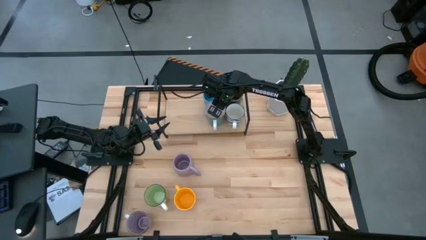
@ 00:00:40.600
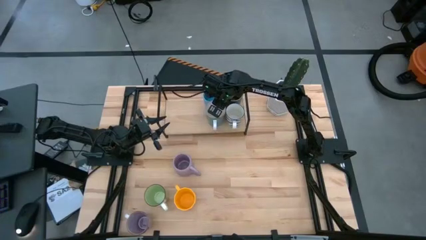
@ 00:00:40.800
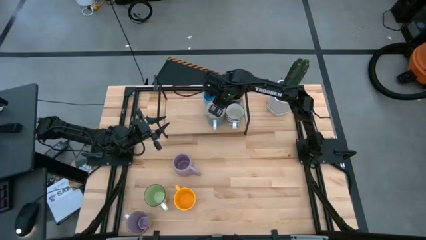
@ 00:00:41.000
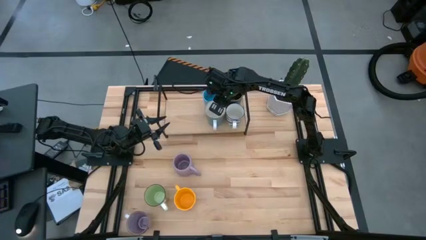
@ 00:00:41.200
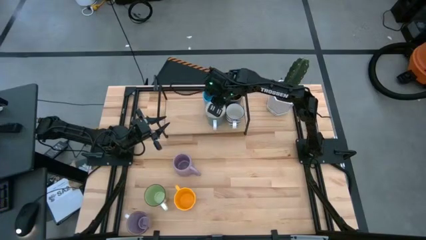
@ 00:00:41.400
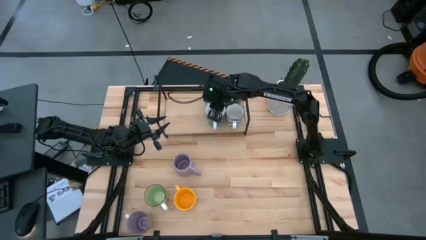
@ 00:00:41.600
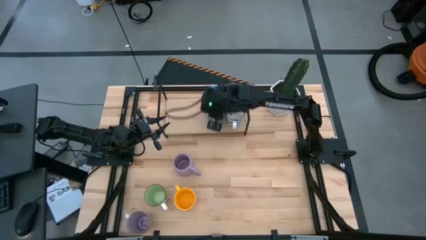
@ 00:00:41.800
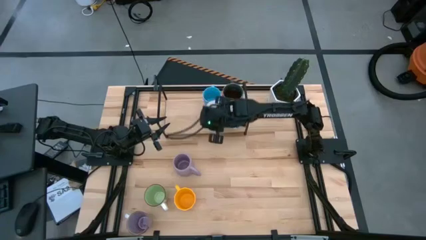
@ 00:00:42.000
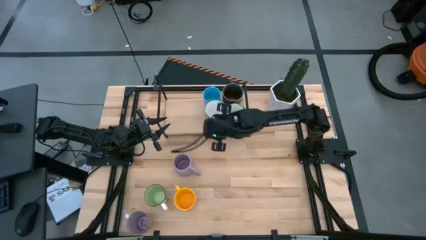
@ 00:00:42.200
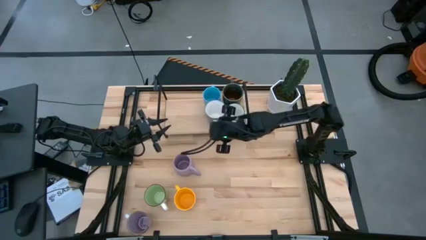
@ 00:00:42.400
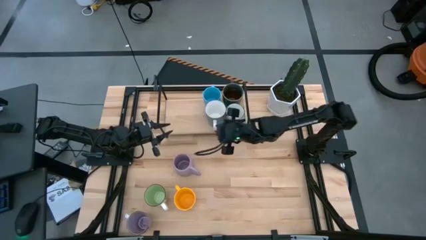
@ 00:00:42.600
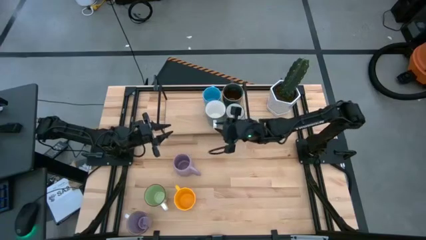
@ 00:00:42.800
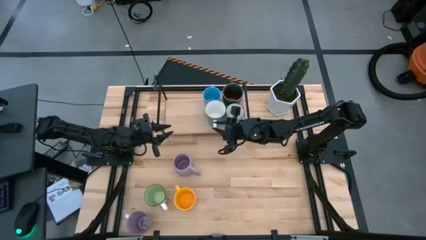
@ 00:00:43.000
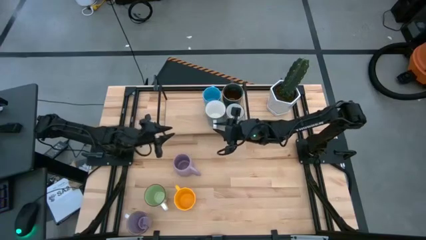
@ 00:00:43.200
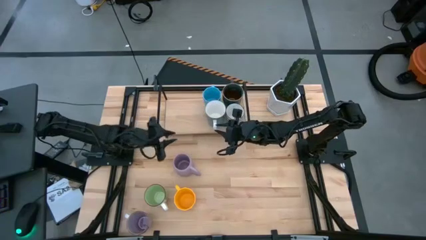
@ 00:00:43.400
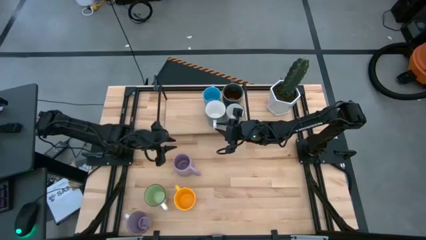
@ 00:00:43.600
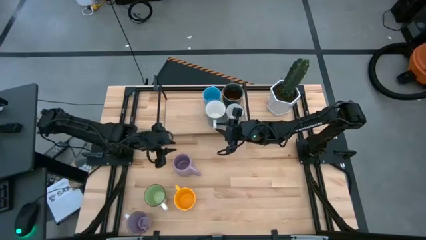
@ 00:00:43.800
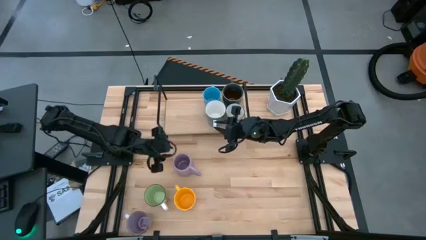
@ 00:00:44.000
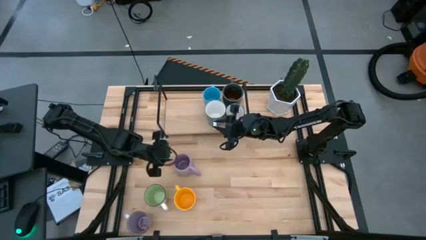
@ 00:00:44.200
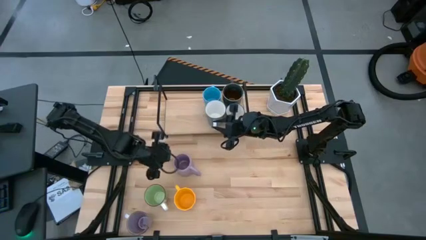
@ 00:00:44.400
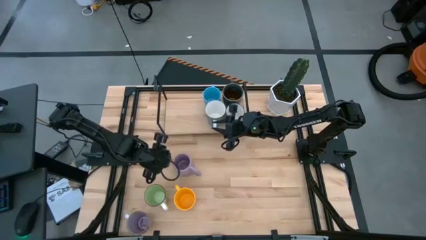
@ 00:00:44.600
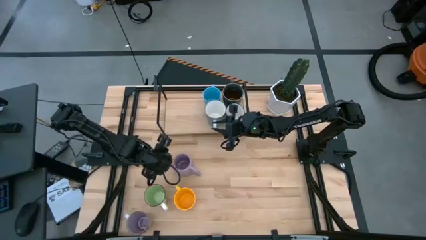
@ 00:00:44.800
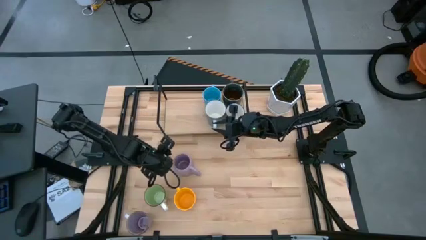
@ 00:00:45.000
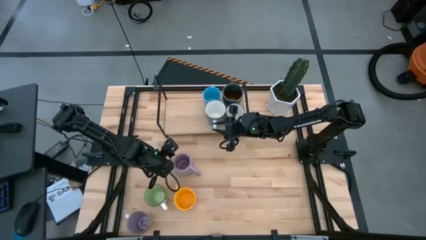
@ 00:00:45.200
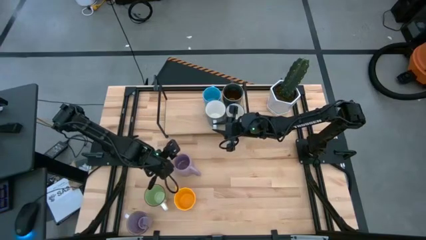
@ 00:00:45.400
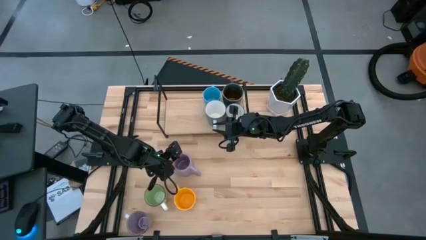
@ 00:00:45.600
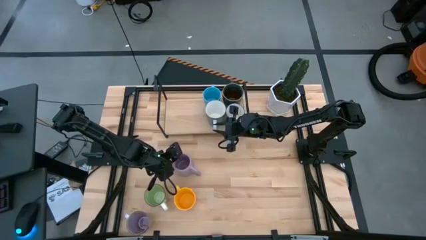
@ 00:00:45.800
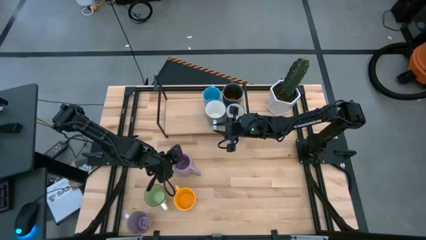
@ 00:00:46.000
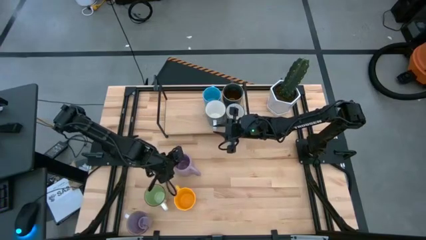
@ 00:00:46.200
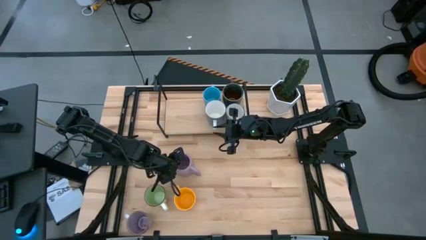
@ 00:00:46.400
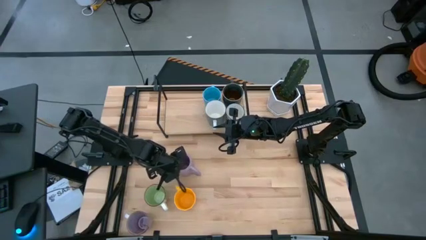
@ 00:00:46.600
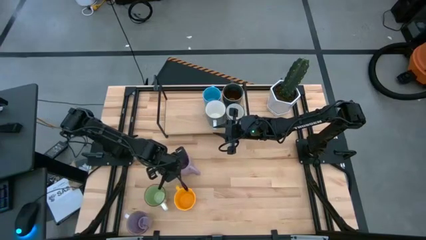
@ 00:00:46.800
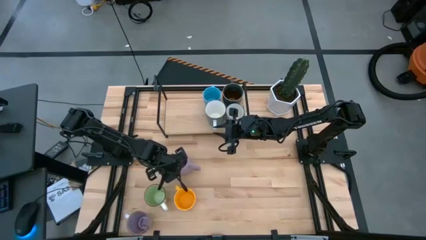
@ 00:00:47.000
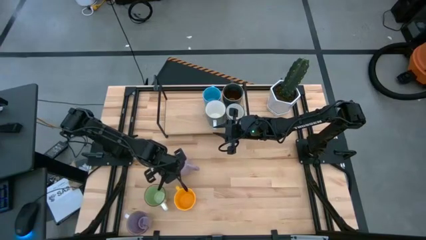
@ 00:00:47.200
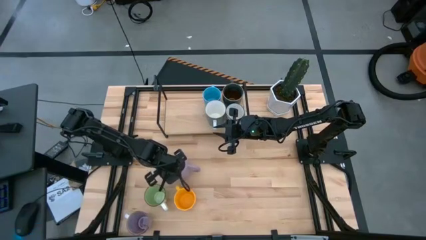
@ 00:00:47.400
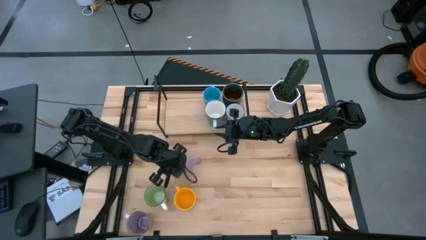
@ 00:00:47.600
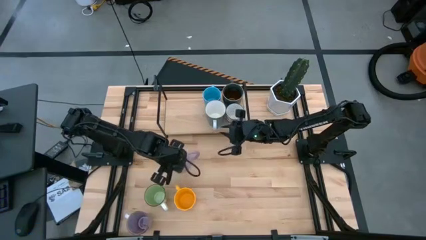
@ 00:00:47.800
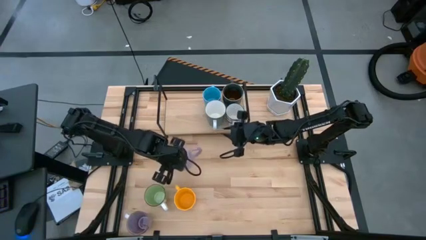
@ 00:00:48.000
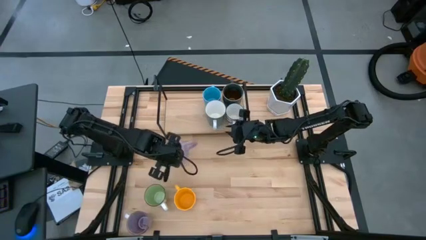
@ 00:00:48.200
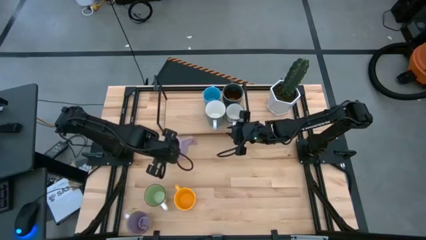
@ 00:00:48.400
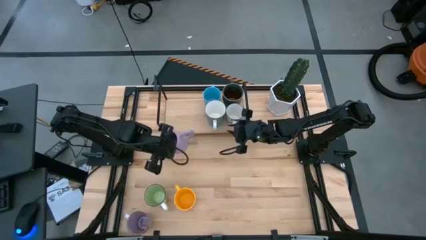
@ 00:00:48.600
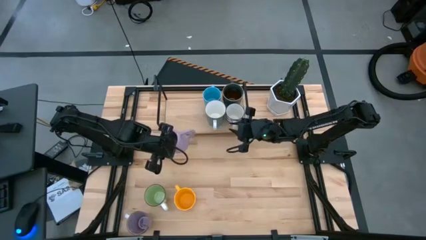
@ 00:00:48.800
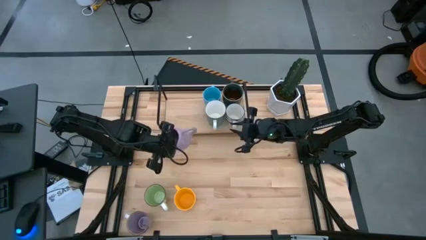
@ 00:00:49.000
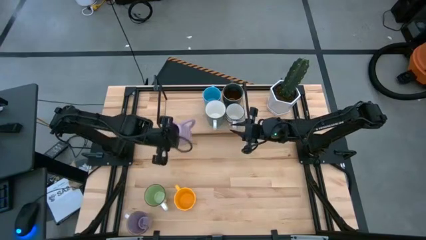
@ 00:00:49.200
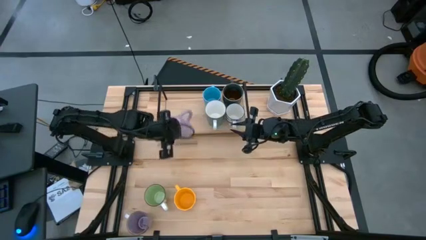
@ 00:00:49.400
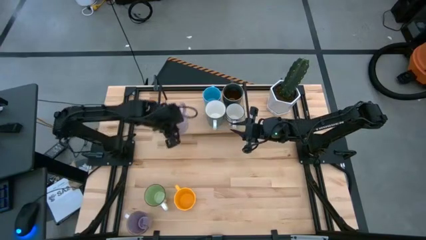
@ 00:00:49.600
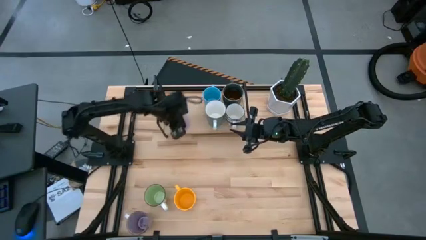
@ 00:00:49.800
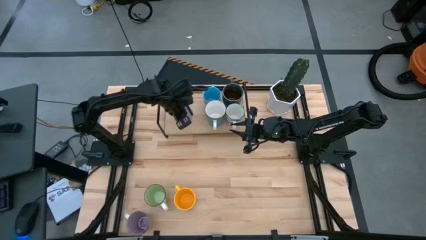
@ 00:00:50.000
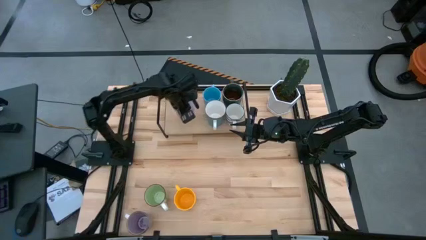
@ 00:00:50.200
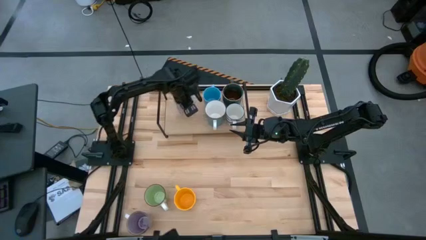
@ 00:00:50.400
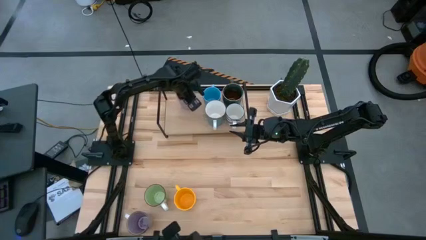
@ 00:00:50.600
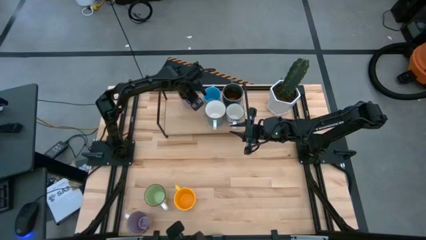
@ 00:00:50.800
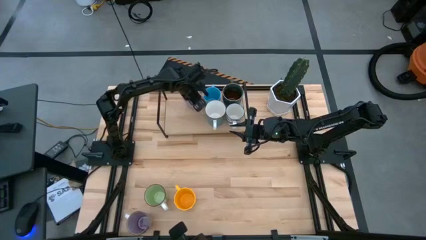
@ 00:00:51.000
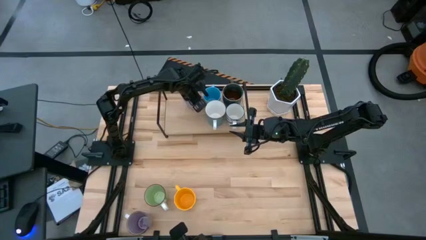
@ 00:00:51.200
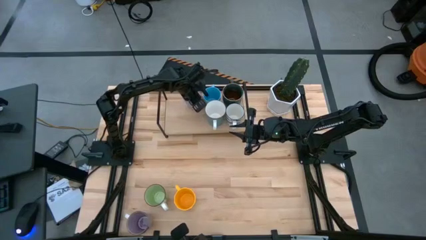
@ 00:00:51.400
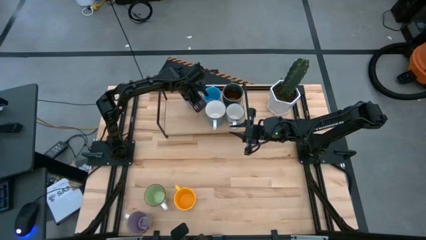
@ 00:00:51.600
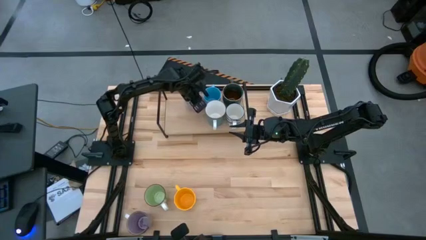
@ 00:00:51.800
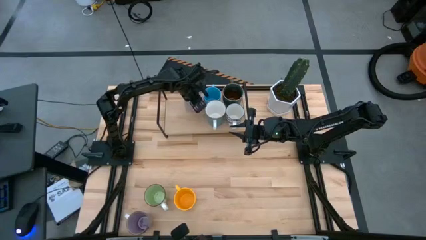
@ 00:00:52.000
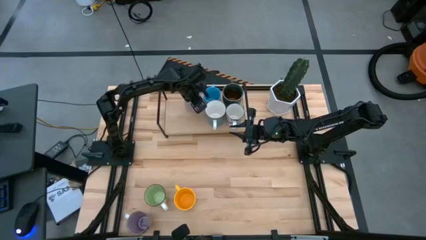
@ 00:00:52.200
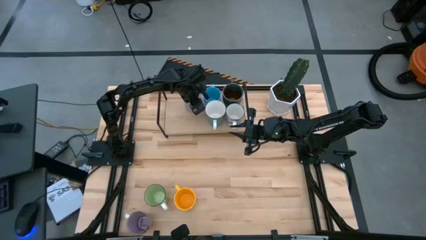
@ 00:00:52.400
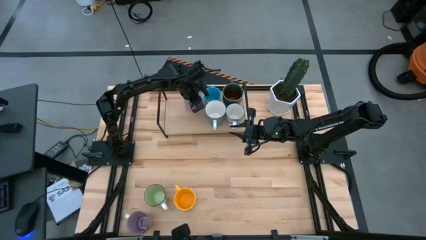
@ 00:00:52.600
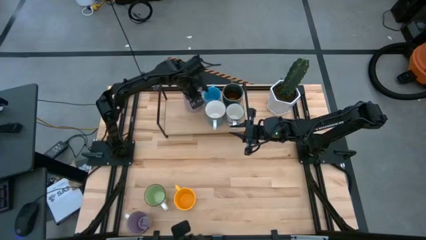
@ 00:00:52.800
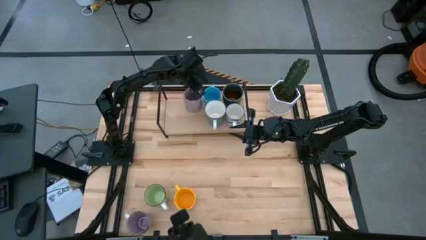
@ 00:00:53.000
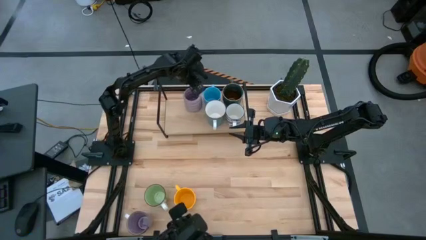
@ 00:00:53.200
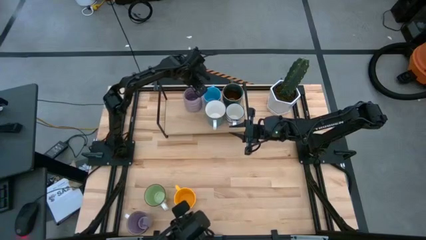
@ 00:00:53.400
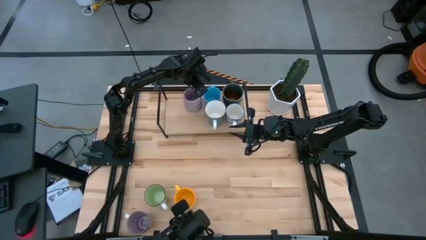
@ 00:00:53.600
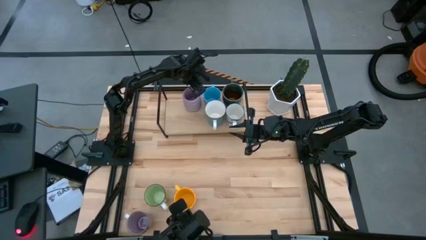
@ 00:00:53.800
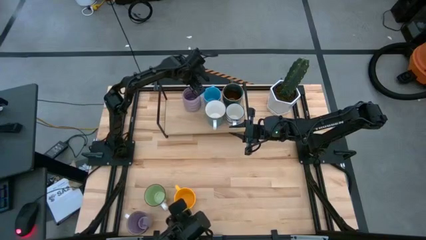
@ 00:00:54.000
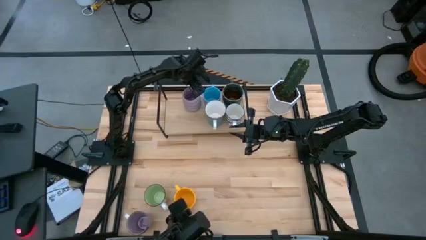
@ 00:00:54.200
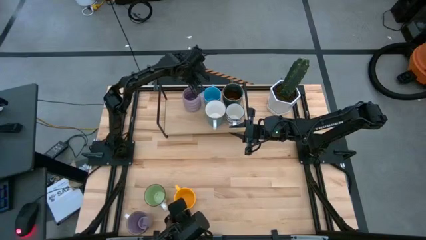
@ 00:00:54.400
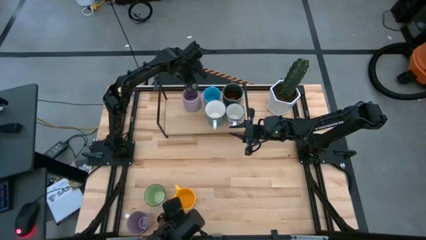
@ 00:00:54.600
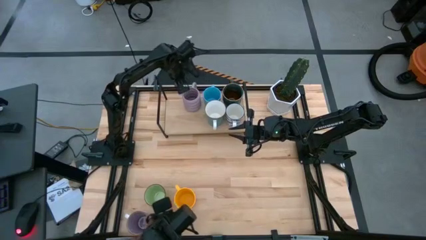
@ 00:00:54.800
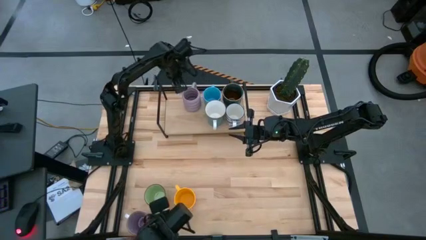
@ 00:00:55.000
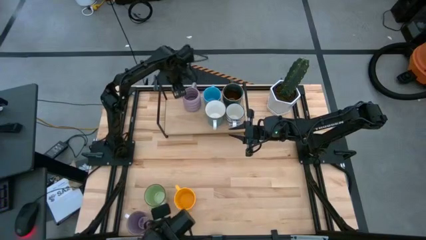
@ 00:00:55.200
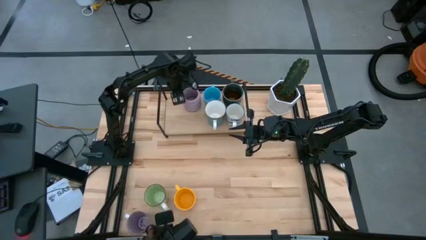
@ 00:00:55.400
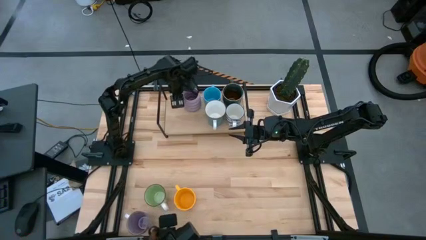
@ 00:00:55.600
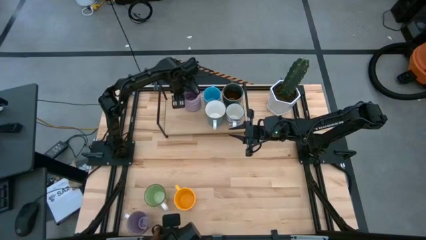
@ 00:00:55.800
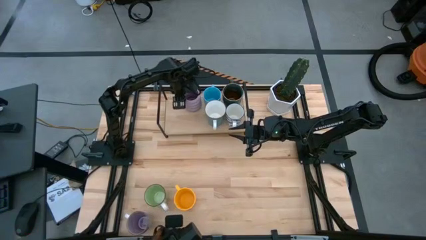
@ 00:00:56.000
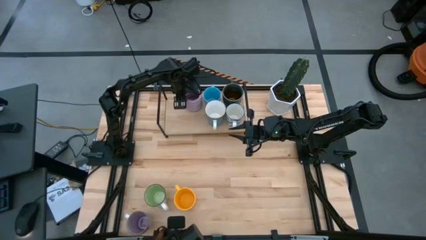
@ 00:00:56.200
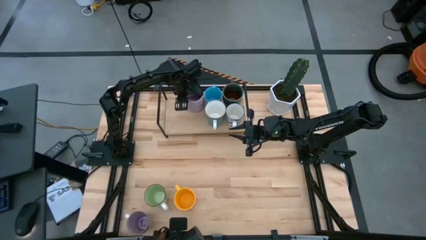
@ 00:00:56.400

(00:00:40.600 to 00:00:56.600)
Task: Place coffee mugs
Put the top purple mug on the shelf
